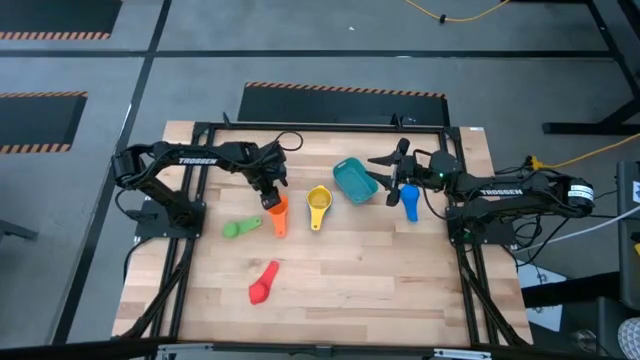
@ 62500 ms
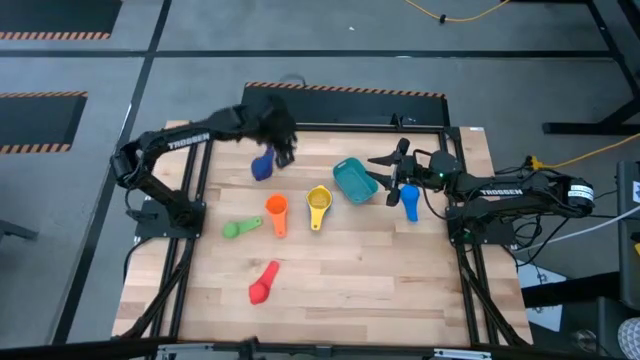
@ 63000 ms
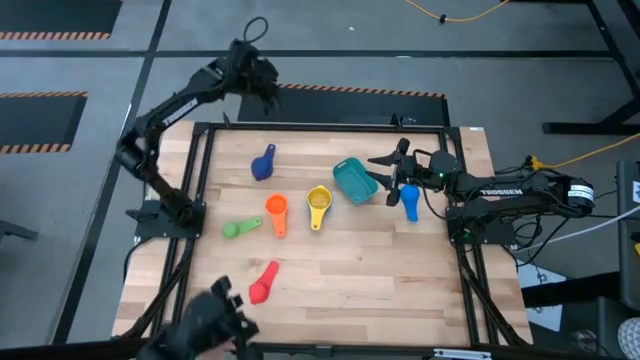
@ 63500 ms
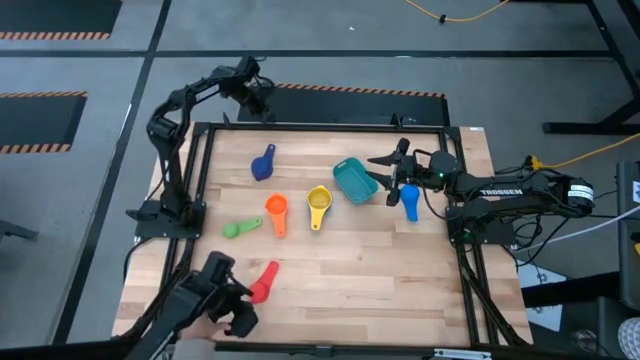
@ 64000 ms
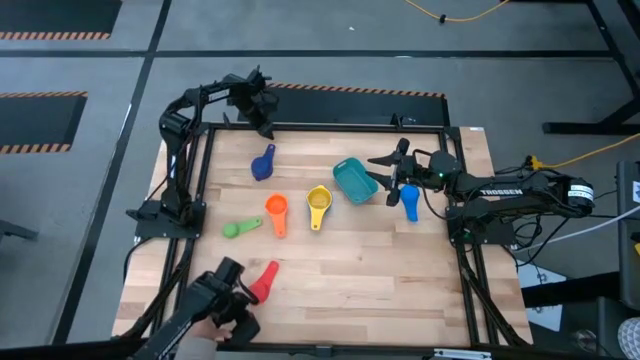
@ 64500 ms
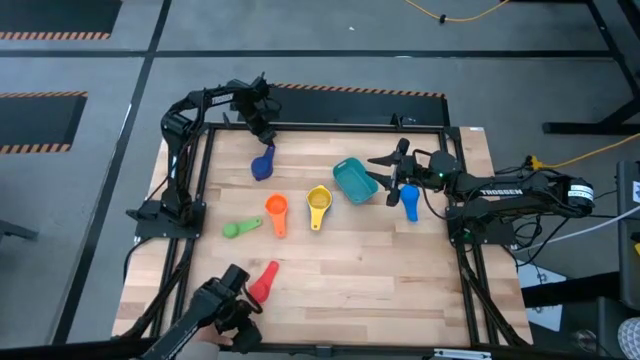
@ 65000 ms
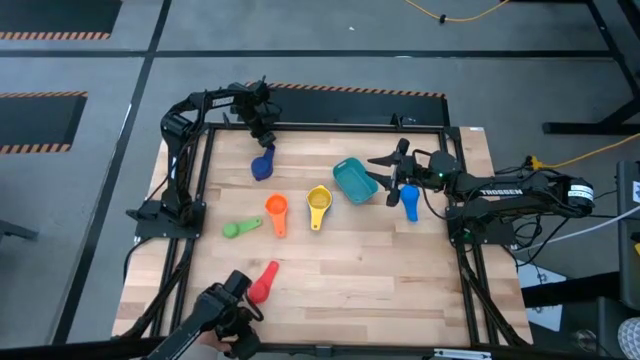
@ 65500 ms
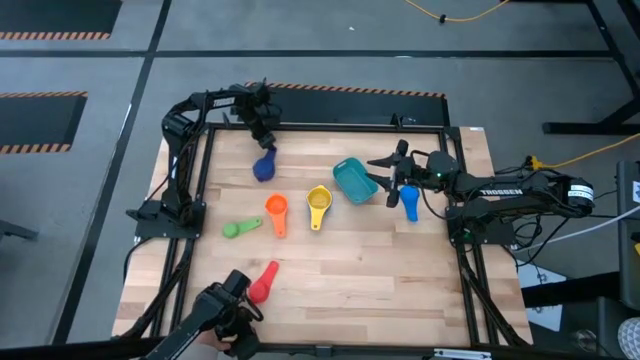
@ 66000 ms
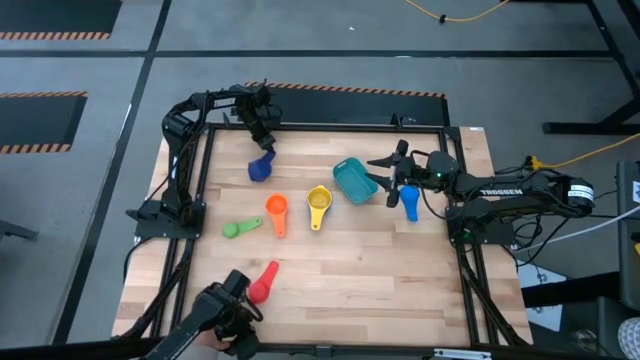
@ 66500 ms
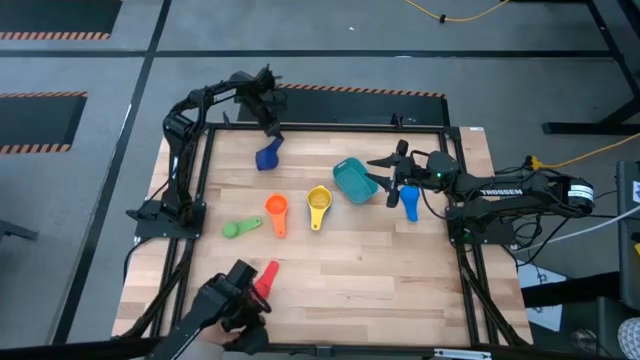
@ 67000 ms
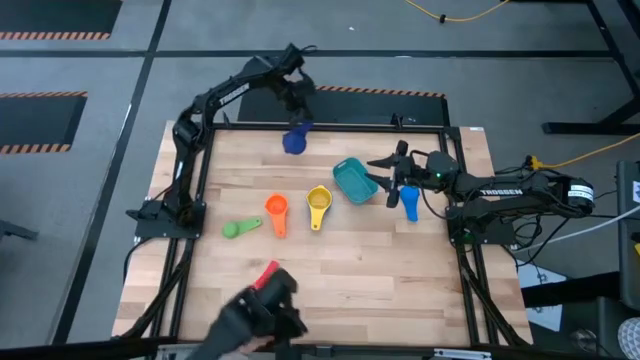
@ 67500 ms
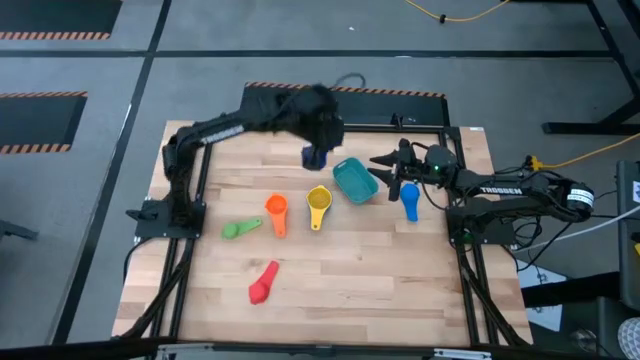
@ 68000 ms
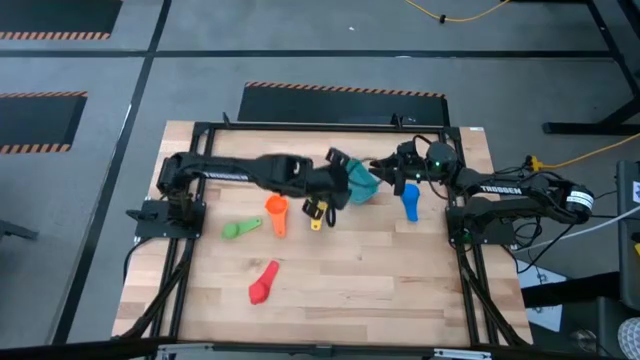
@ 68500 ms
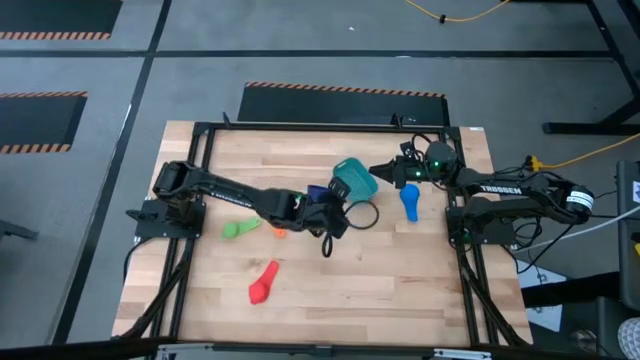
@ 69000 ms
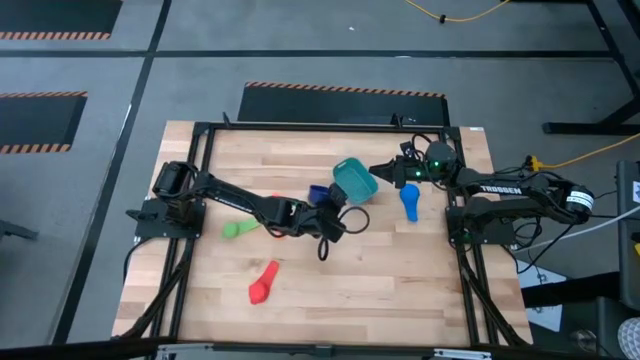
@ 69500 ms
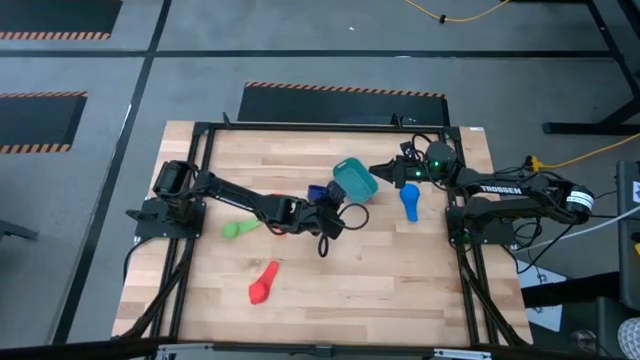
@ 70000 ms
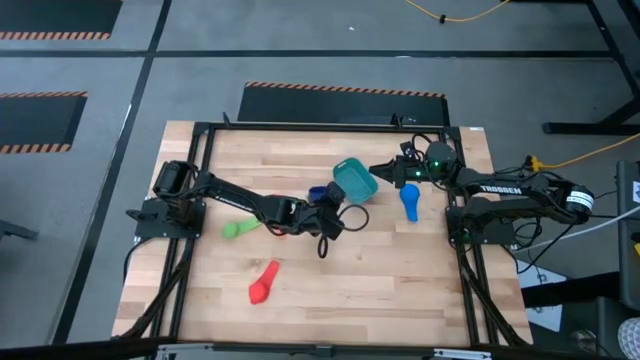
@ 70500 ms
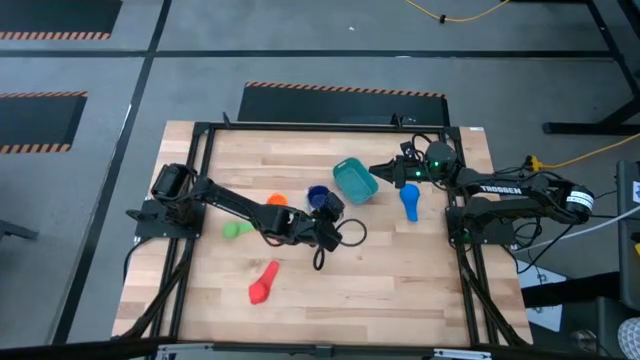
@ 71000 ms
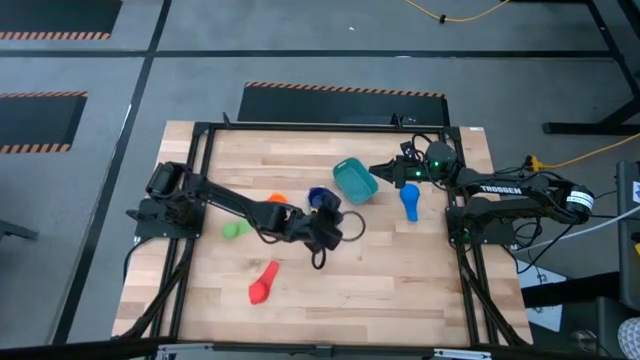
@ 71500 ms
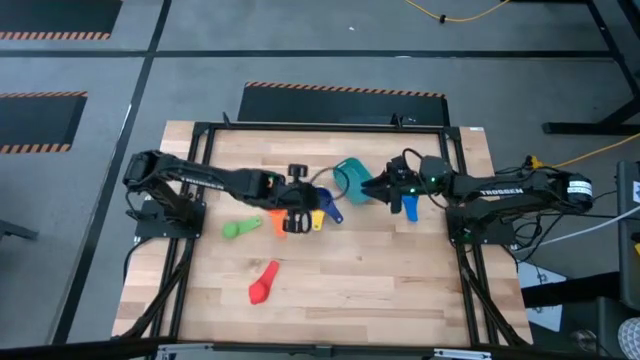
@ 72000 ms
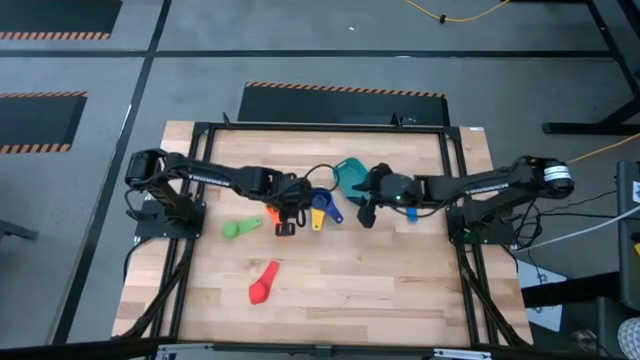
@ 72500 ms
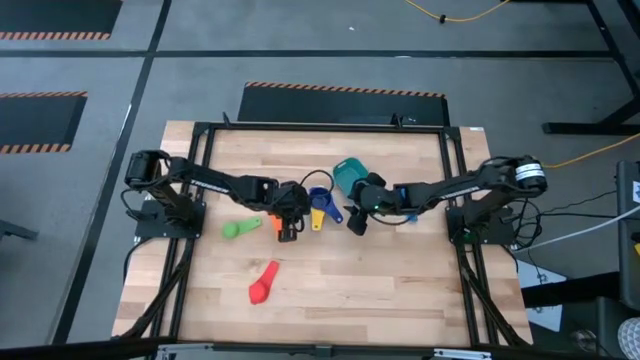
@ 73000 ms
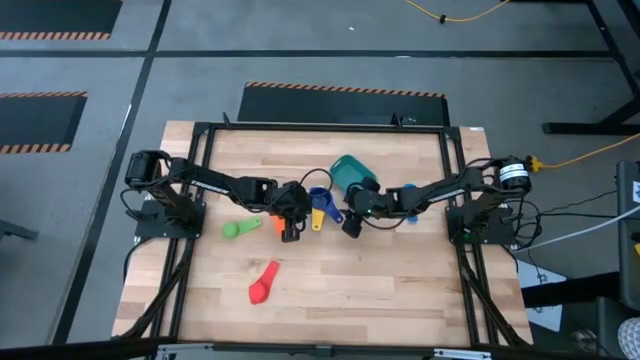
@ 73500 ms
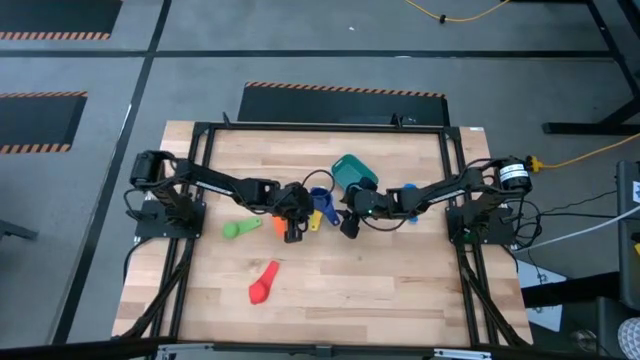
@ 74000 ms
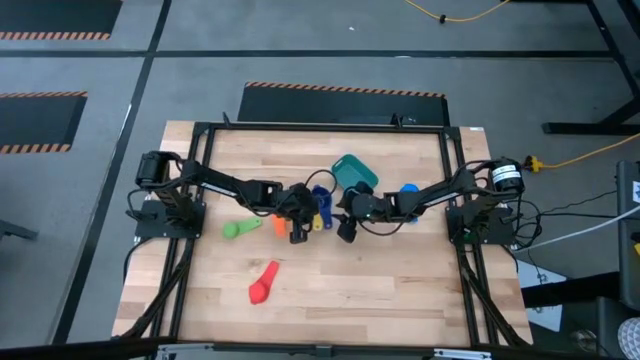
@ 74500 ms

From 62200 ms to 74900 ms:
Task: Nest measuring cups in basket
Stack the dark blue measuring cup on top of the yellow measuring cup

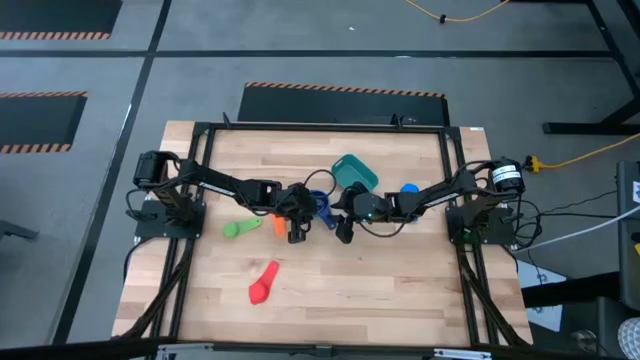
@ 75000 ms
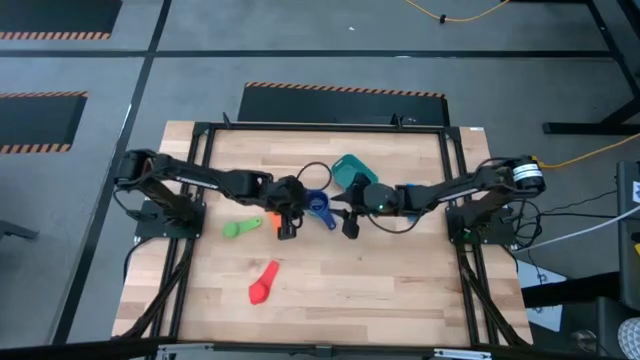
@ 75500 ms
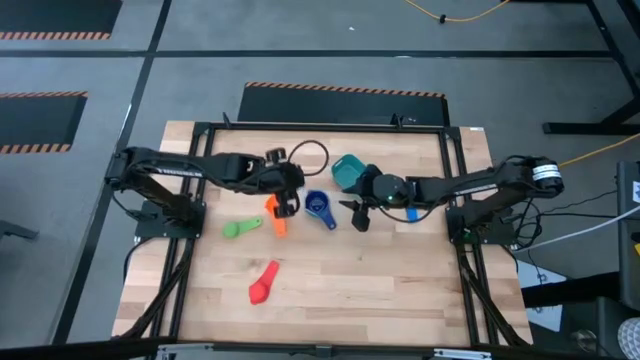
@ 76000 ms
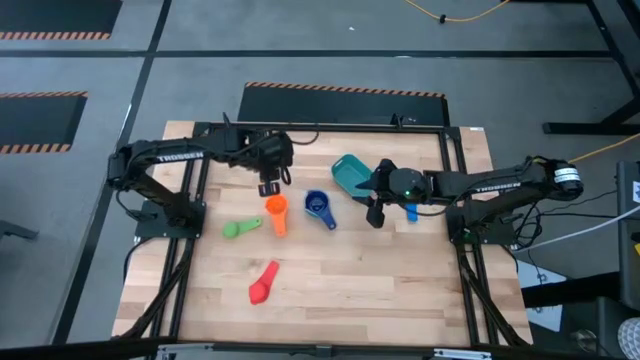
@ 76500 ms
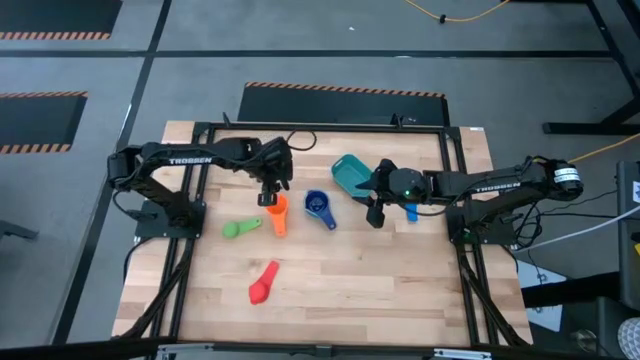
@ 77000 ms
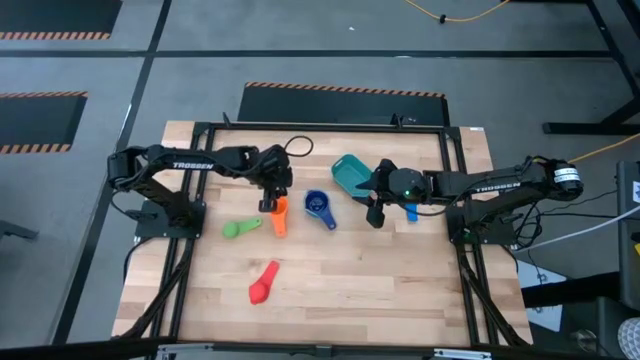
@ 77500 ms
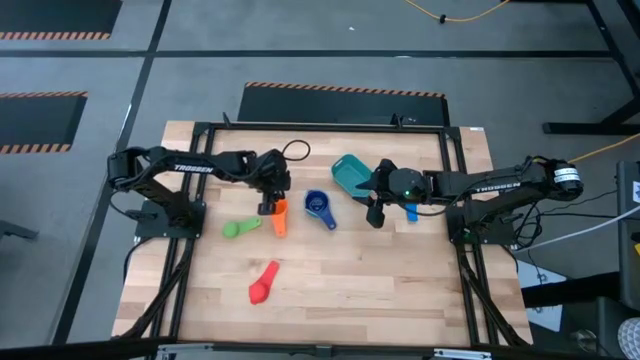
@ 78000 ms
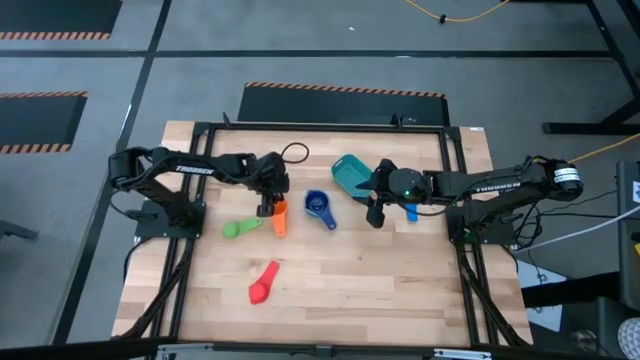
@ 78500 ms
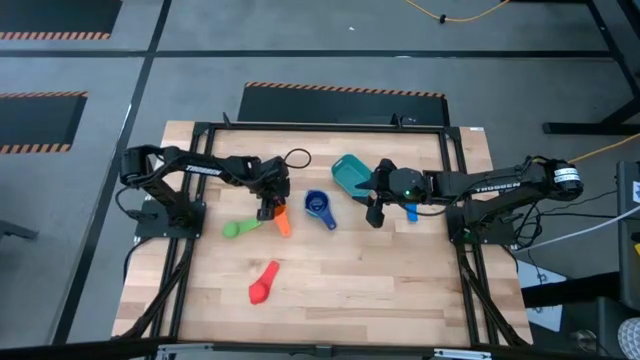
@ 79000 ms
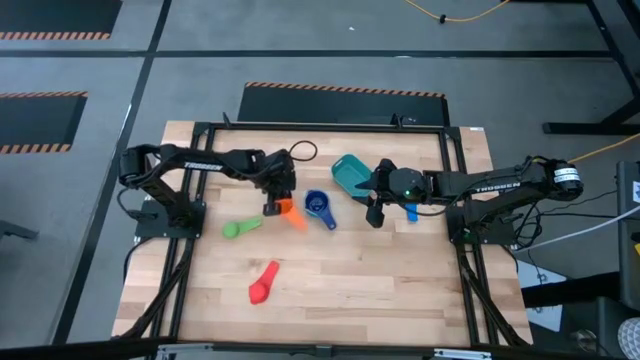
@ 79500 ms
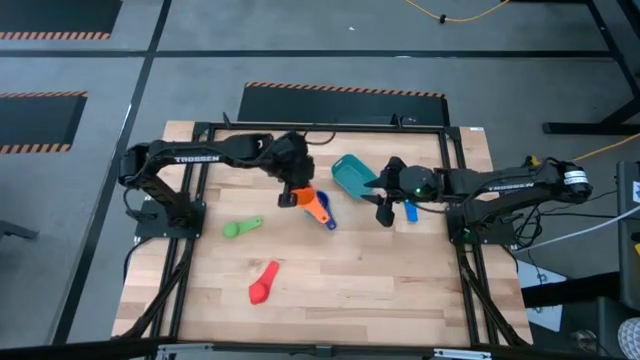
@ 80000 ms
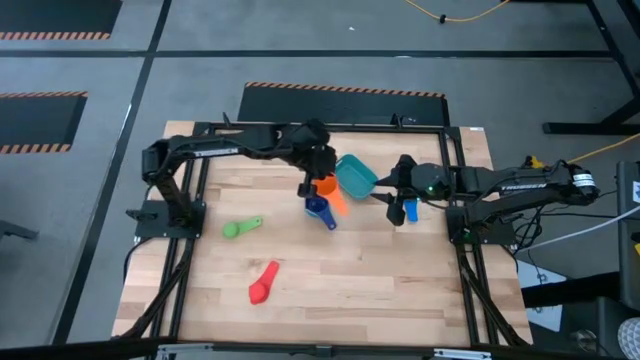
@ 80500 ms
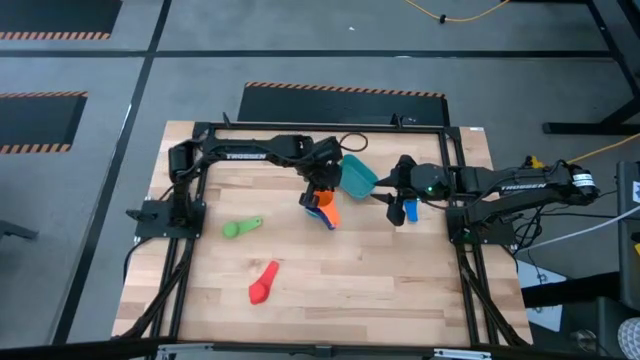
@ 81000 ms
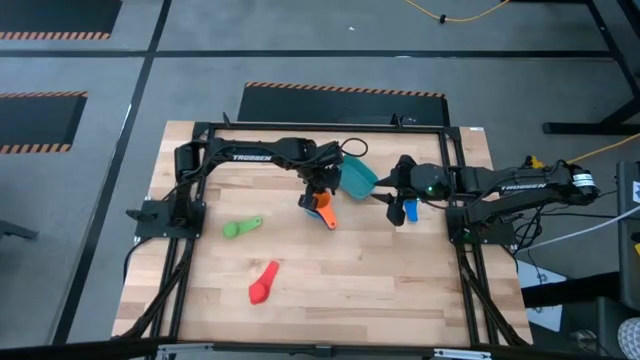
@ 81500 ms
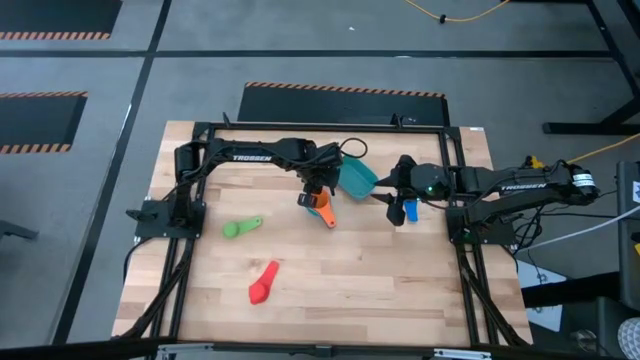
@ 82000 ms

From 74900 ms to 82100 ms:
Stack the orange measuring cup on top of the dark blue measuring cup
